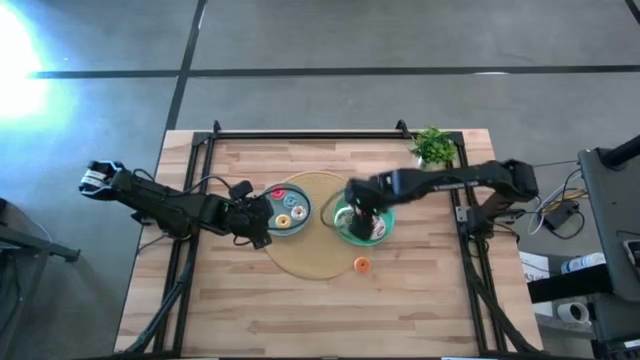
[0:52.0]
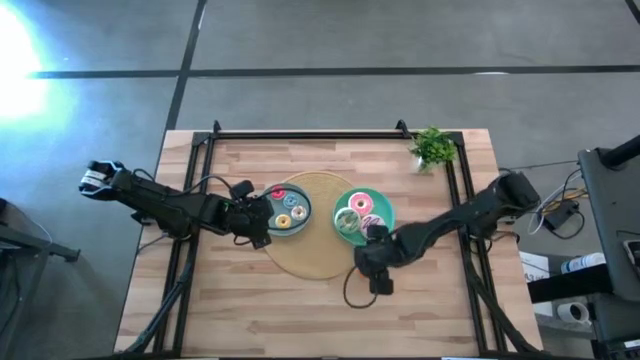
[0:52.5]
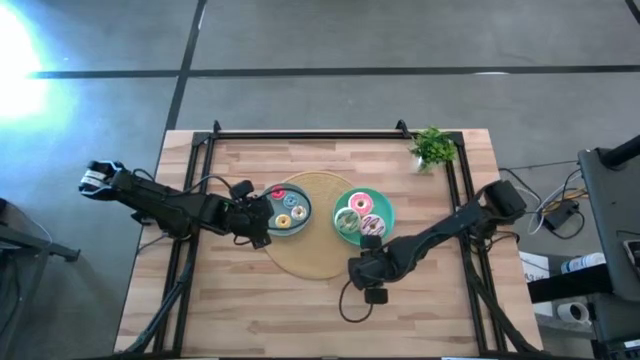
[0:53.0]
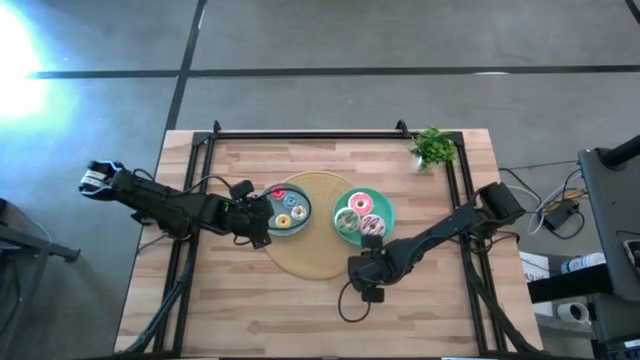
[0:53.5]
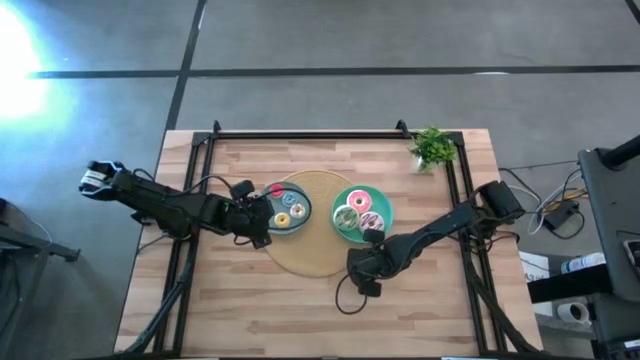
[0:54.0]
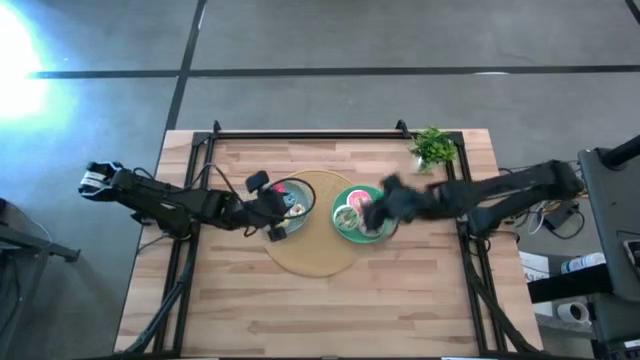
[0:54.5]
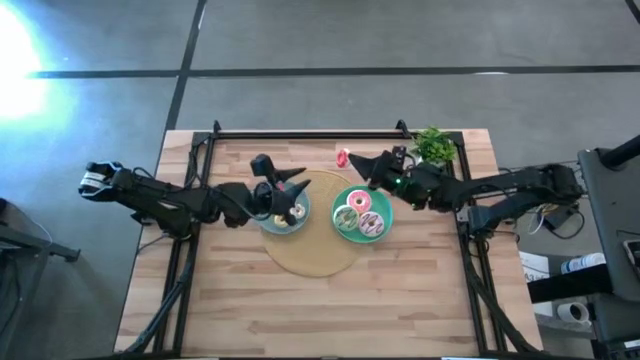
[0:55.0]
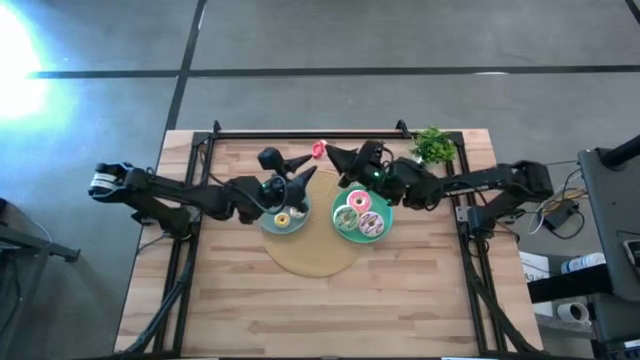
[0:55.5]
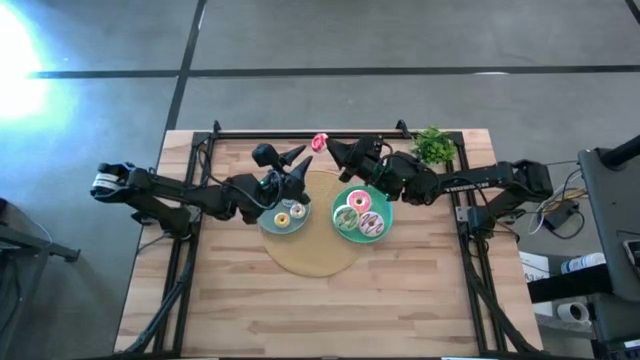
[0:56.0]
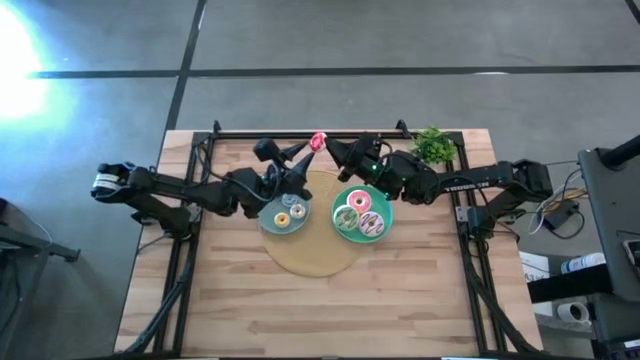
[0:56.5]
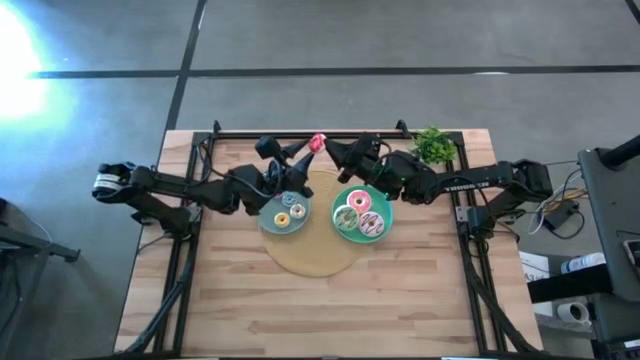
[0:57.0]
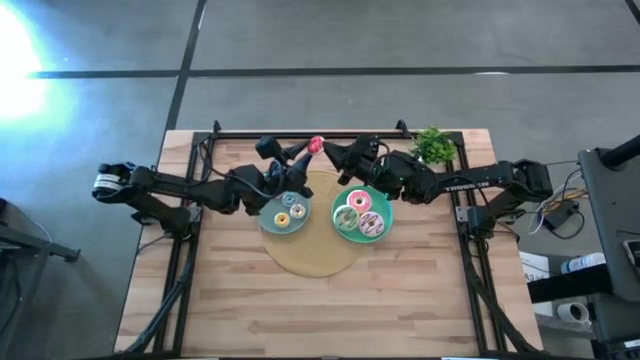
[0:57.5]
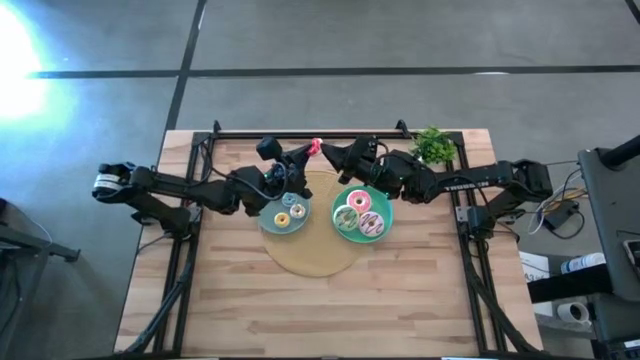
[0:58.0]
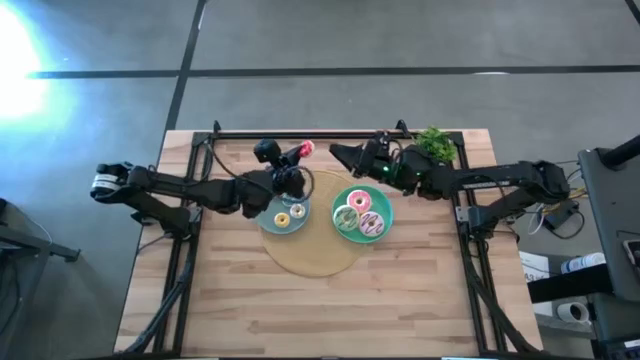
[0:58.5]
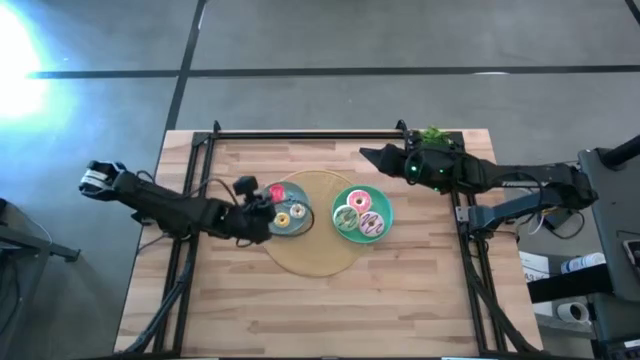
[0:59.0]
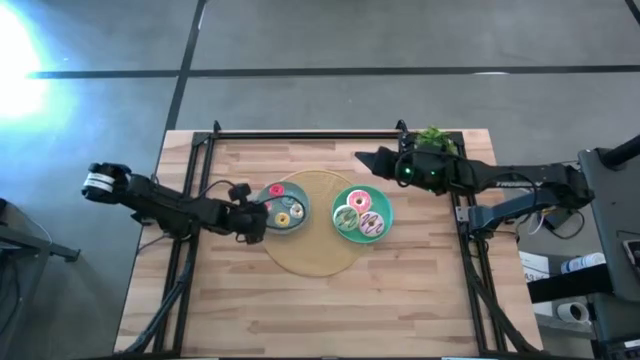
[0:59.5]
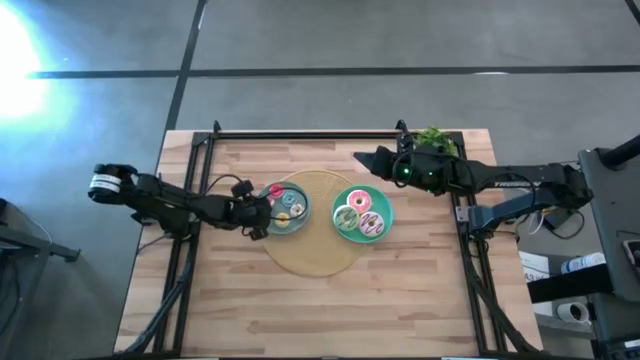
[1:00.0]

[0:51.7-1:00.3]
Task: Pick & Place donuts
Put the small orange donut on the light blue plate

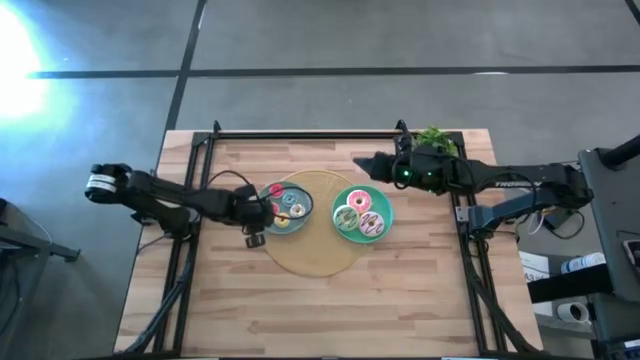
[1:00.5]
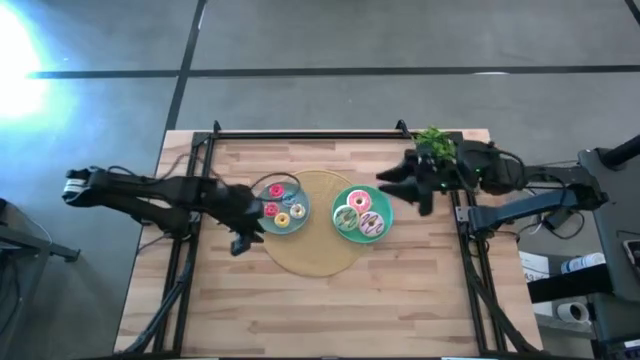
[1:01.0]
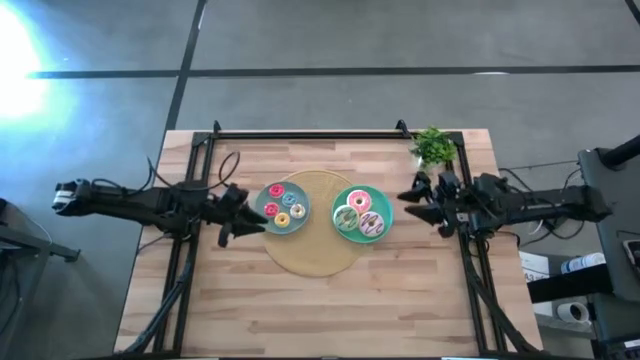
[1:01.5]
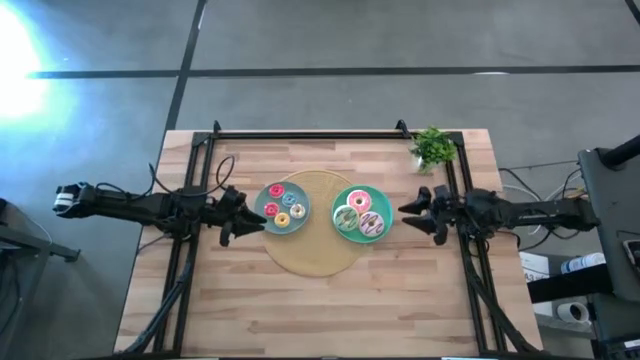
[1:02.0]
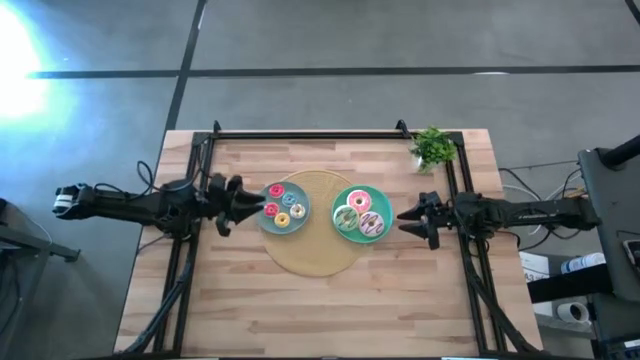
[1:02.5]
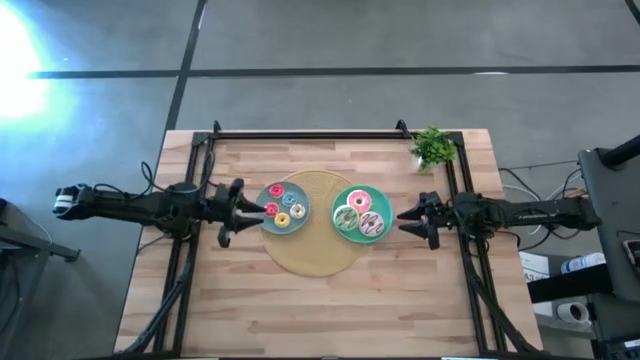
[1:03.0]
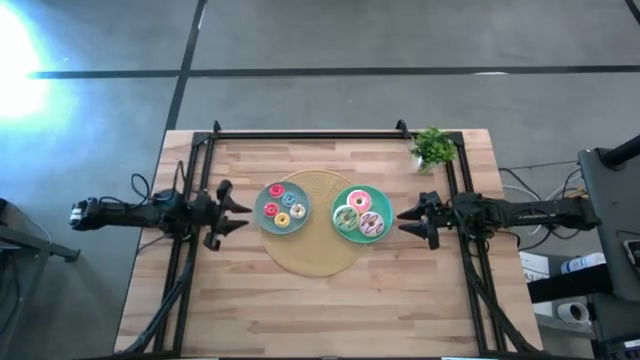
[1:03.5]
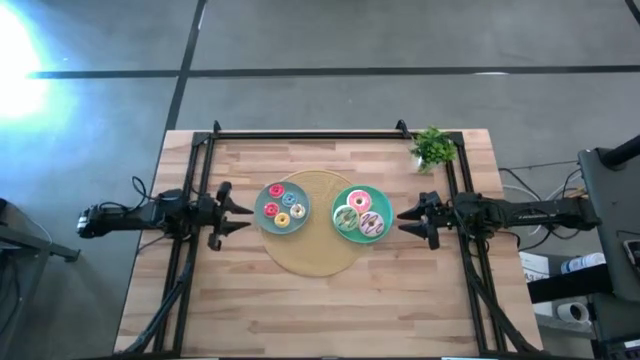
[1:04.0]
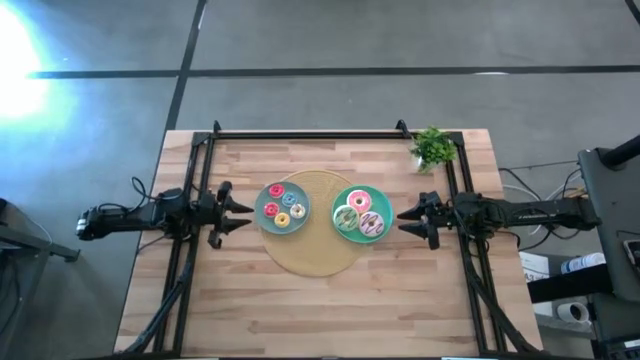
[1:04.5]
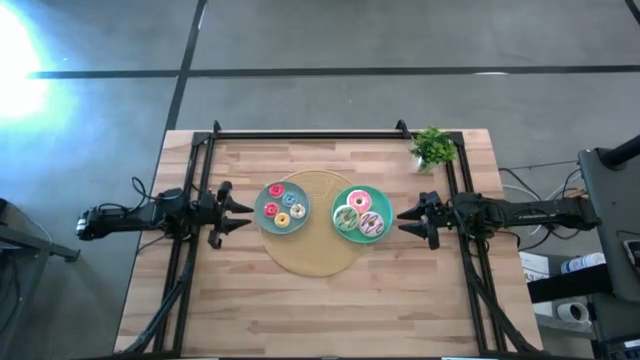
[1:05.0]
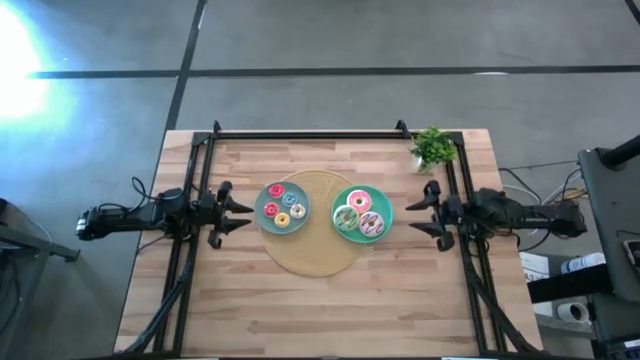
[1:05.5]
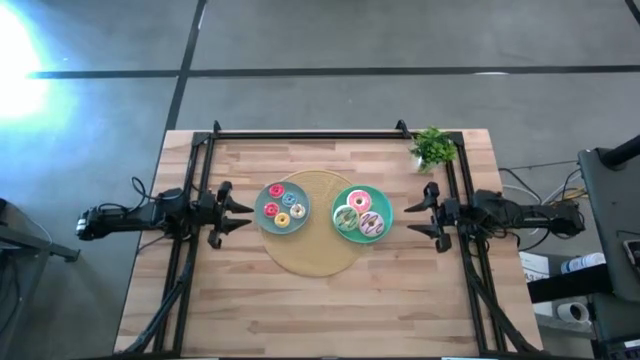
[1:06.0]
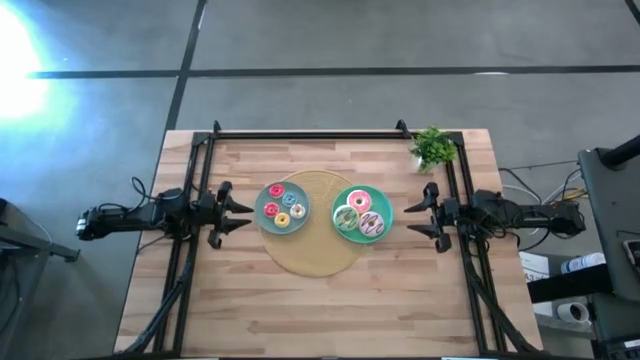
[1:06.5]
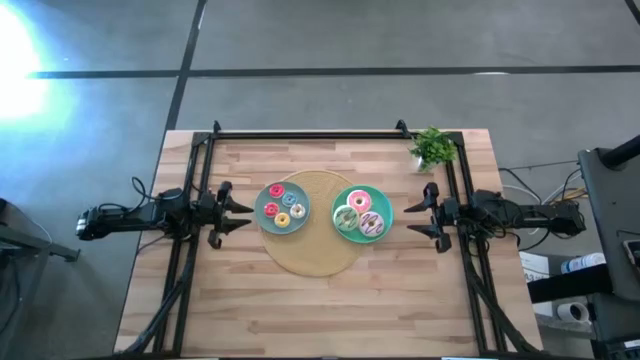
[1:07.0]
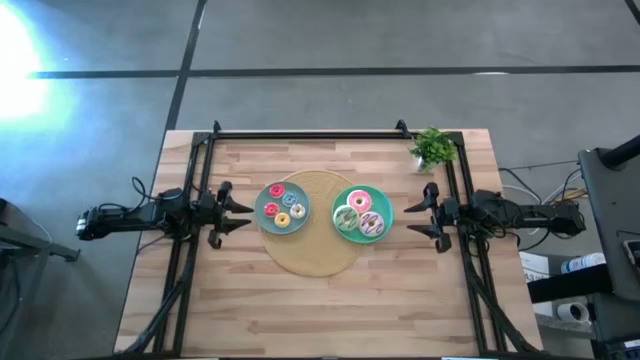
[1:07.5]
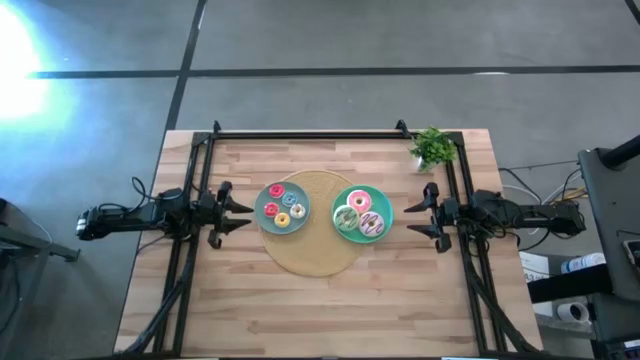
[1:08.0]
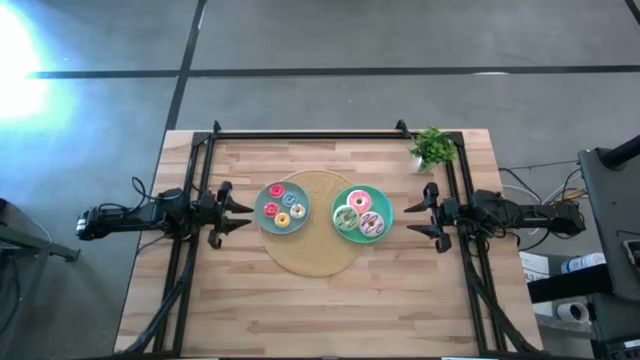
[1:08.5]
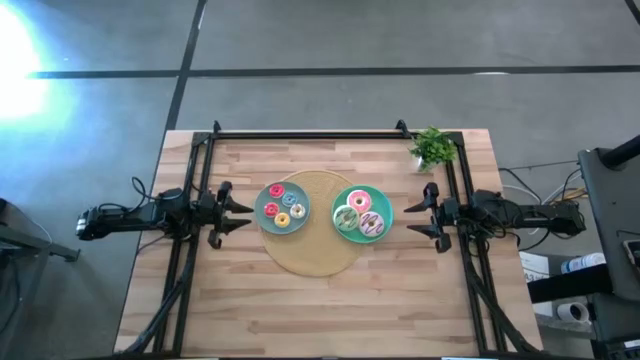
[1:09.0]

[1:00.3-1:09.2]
Return to Home Position

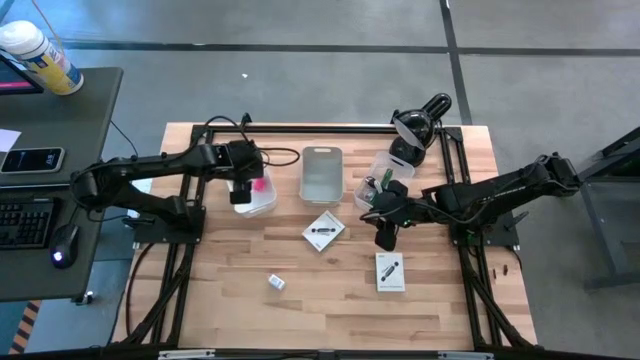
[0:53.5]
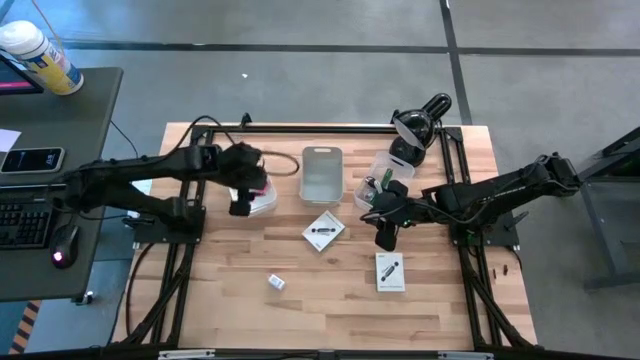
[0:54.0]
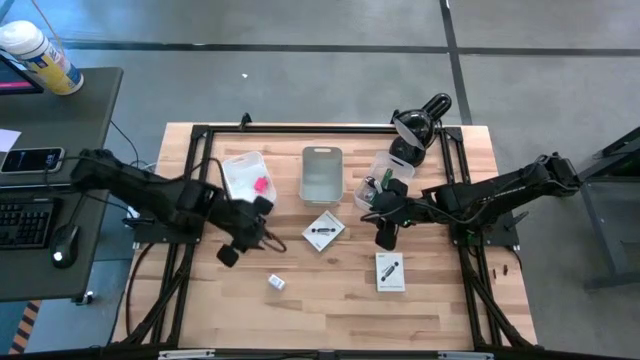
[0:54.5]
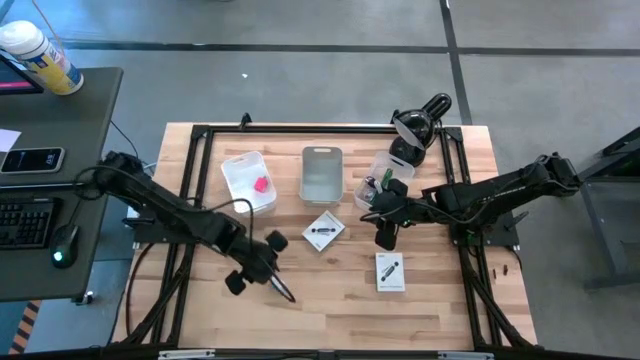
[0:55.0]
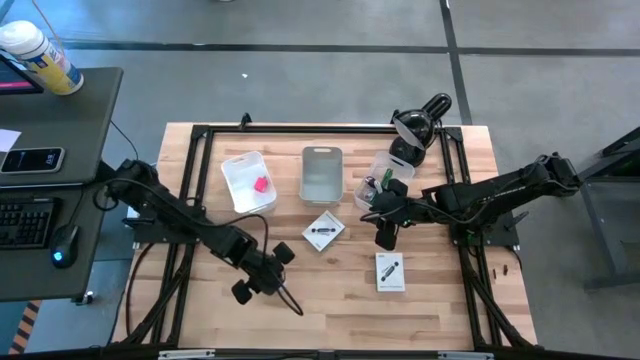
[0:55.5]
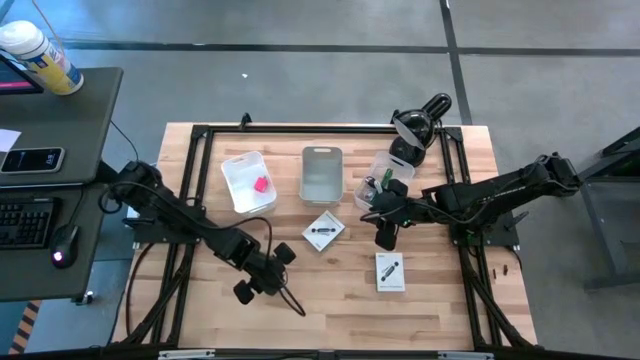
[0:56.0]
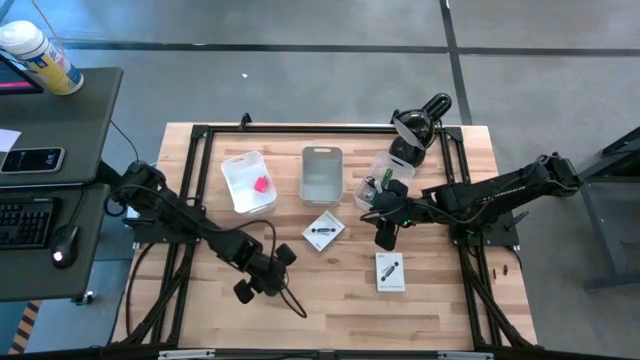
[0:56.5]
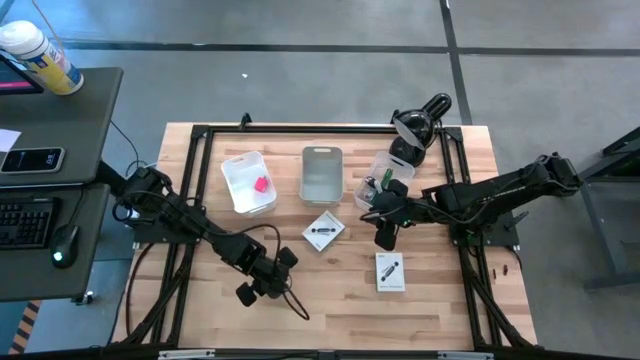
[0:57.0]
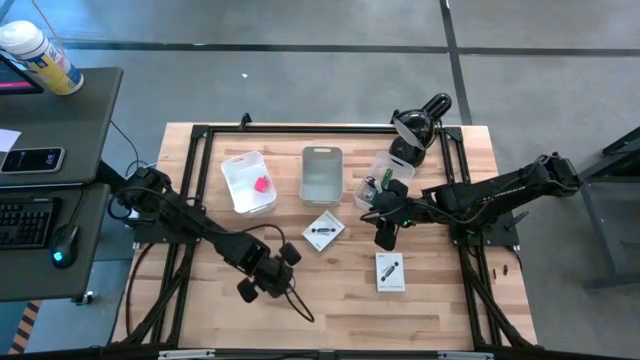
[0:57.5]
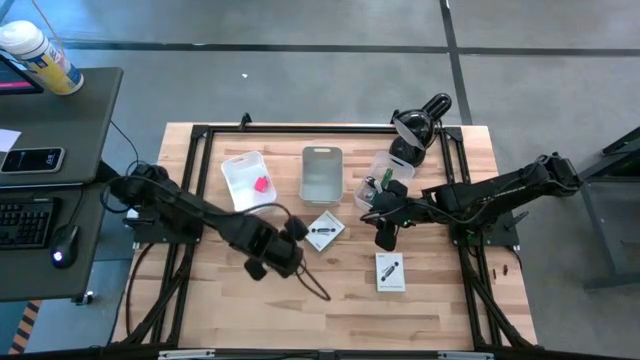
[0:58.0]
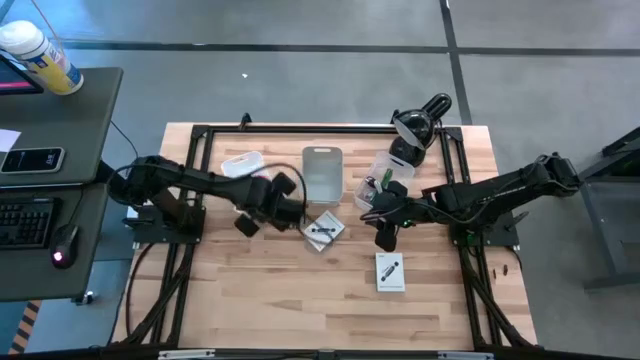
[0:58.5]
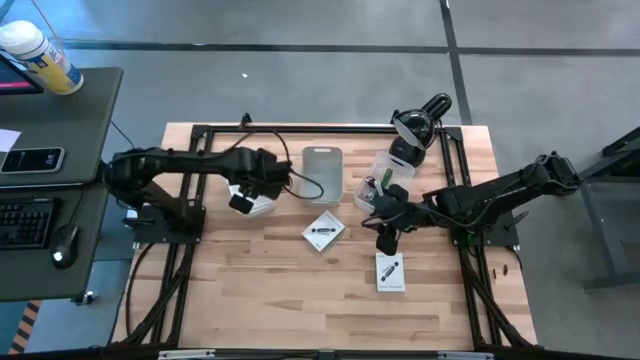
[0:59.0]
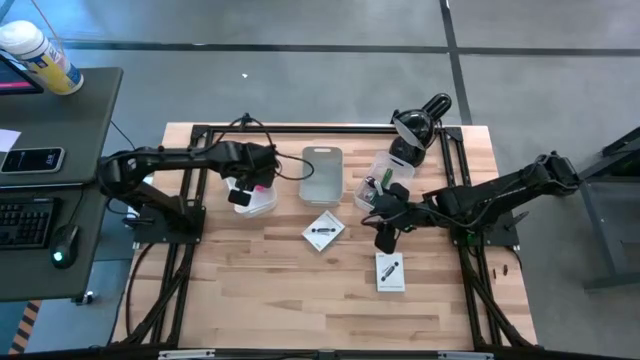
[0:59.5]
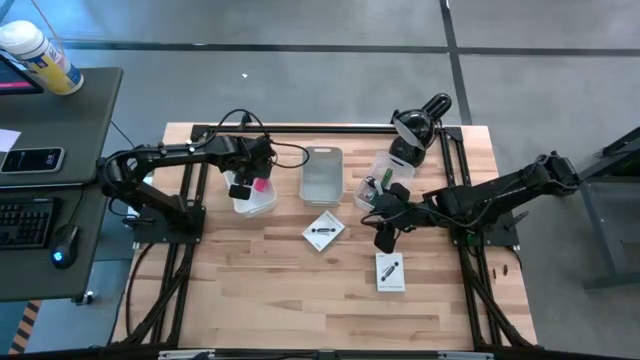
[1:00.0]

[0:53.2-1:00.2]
Task: Pick and place items into bin
Put the white charger adapter into the white bin
